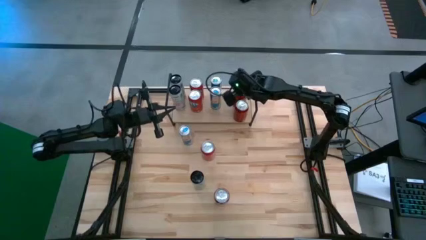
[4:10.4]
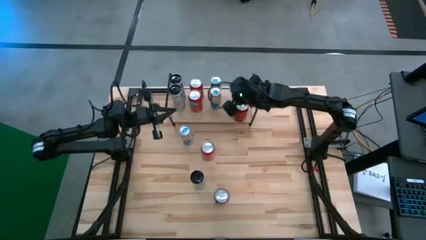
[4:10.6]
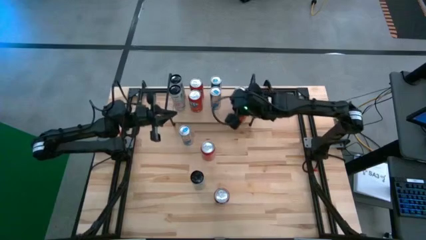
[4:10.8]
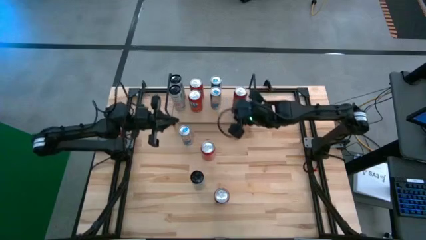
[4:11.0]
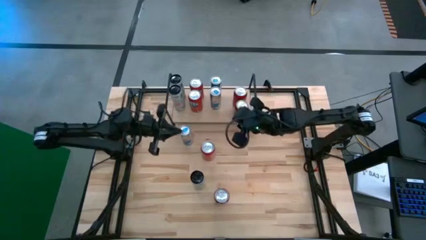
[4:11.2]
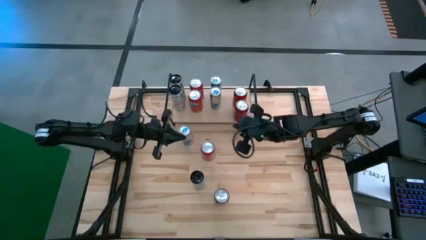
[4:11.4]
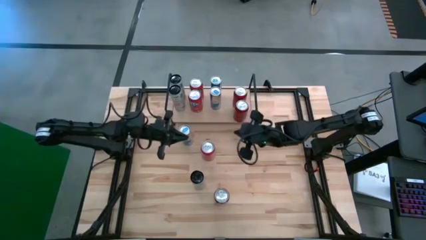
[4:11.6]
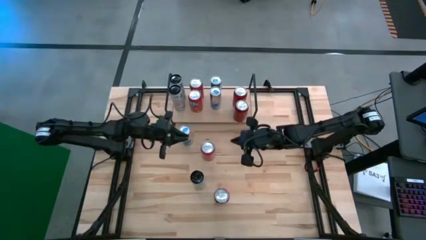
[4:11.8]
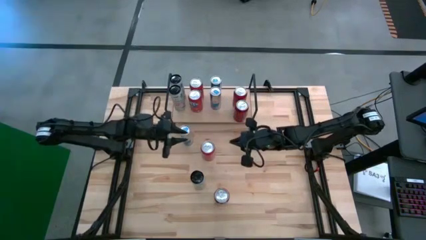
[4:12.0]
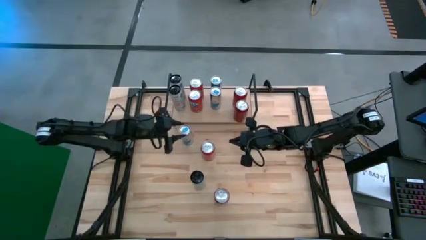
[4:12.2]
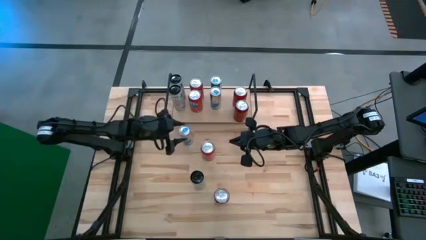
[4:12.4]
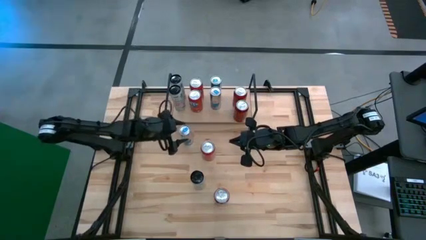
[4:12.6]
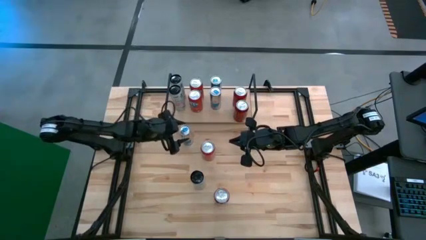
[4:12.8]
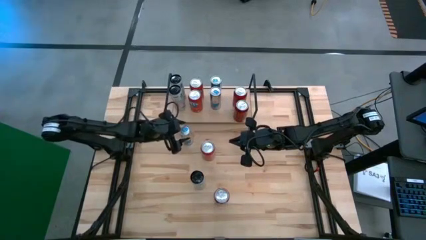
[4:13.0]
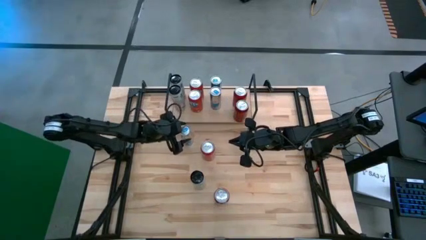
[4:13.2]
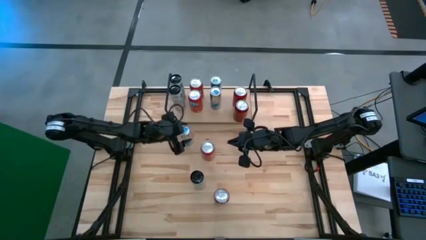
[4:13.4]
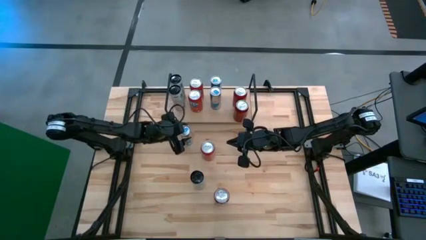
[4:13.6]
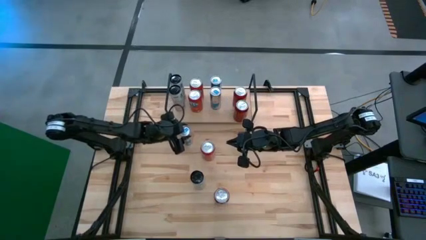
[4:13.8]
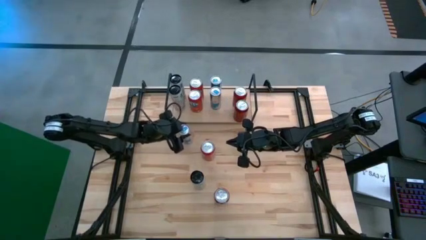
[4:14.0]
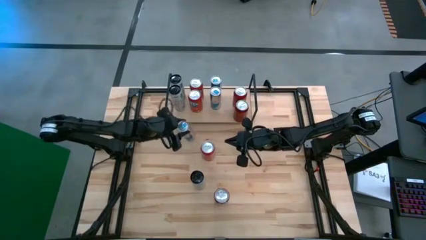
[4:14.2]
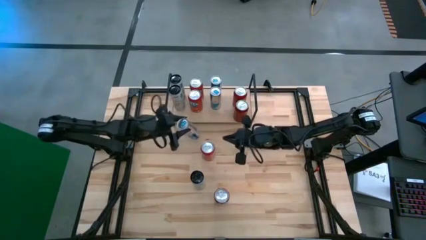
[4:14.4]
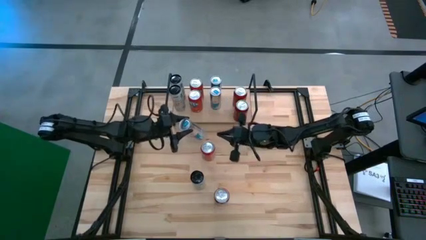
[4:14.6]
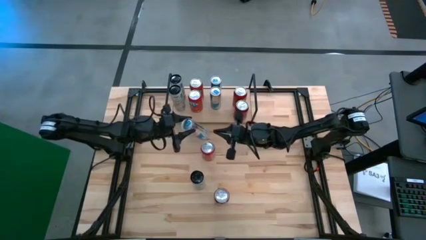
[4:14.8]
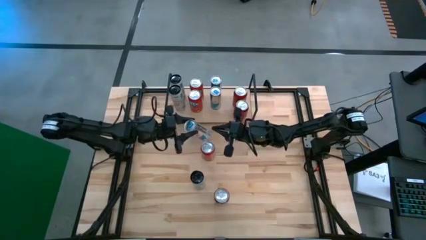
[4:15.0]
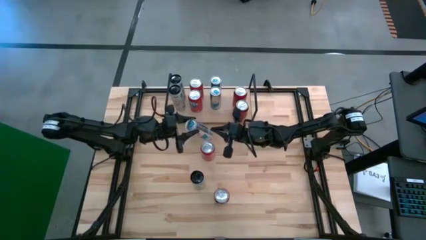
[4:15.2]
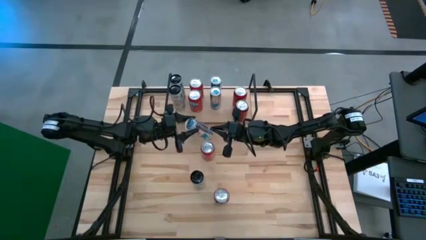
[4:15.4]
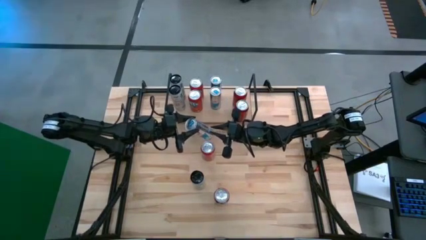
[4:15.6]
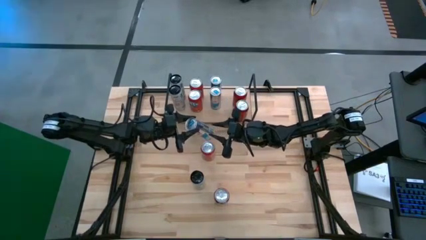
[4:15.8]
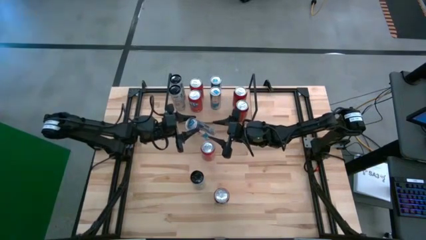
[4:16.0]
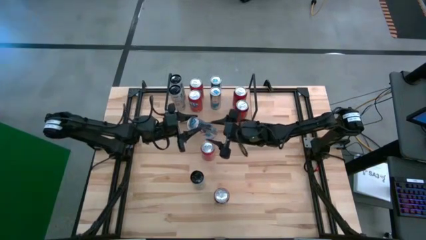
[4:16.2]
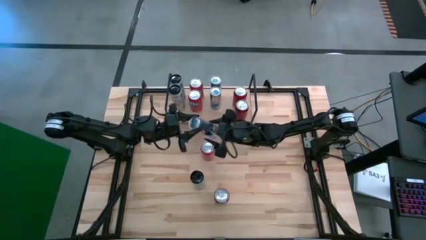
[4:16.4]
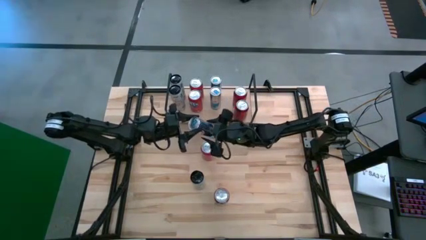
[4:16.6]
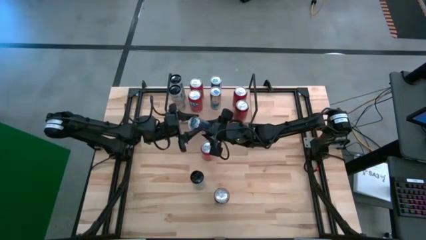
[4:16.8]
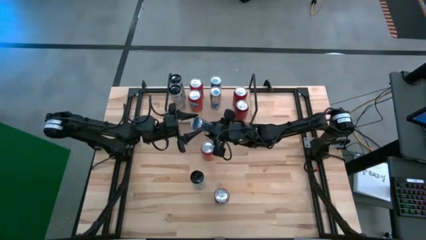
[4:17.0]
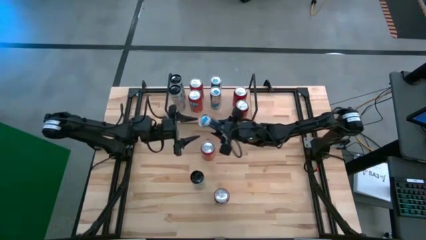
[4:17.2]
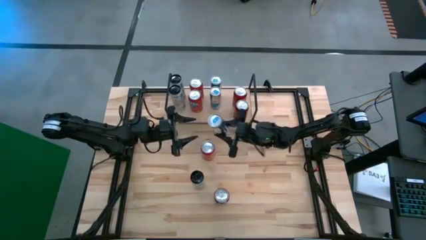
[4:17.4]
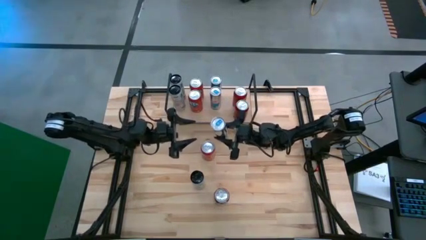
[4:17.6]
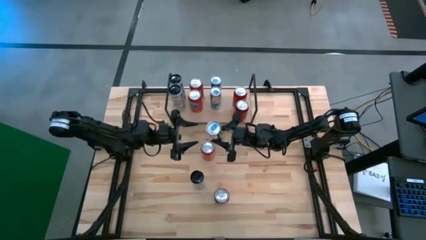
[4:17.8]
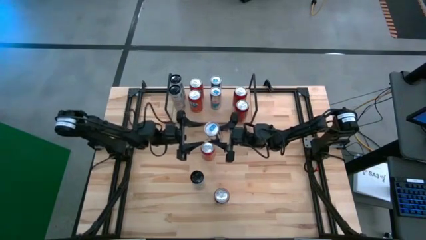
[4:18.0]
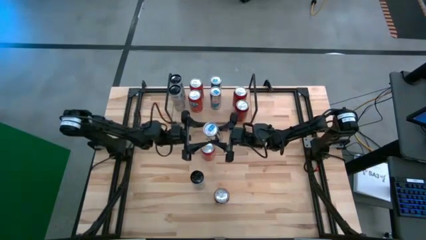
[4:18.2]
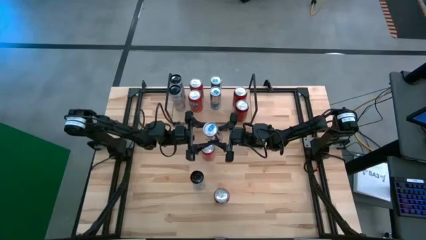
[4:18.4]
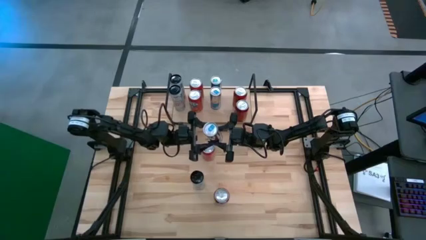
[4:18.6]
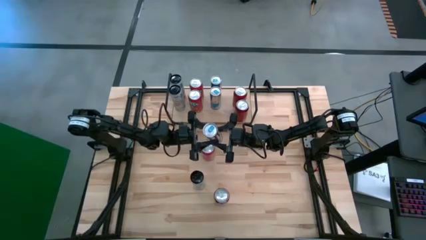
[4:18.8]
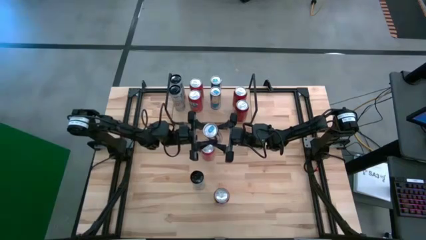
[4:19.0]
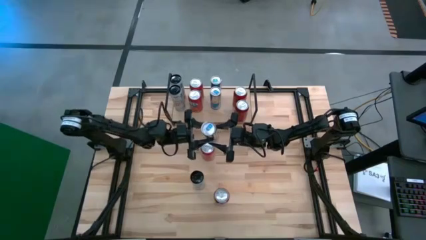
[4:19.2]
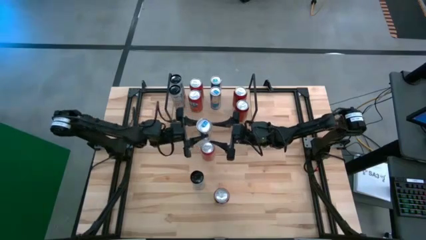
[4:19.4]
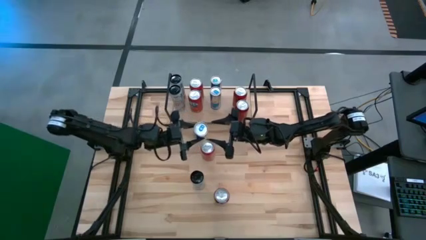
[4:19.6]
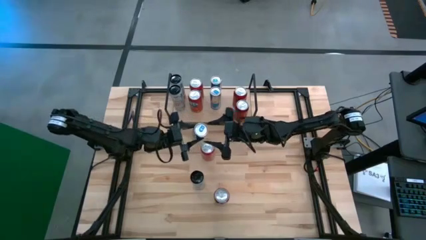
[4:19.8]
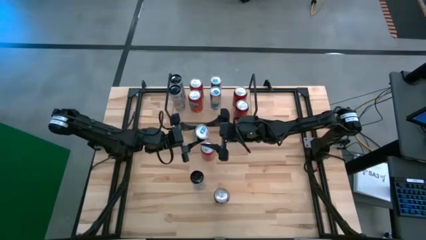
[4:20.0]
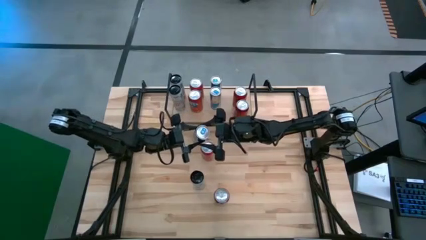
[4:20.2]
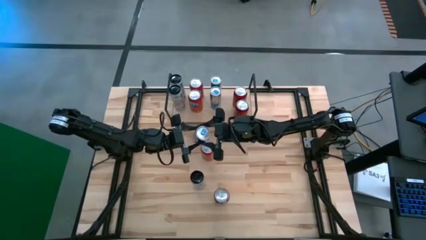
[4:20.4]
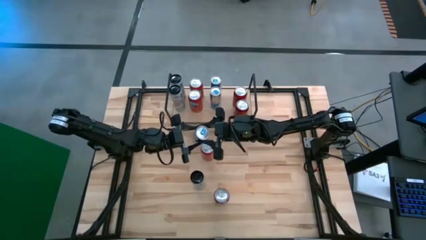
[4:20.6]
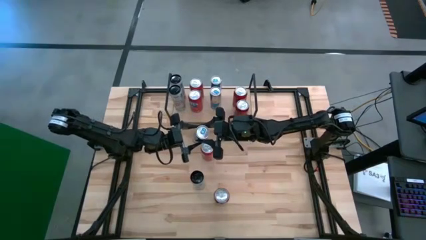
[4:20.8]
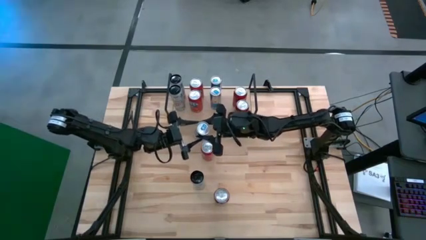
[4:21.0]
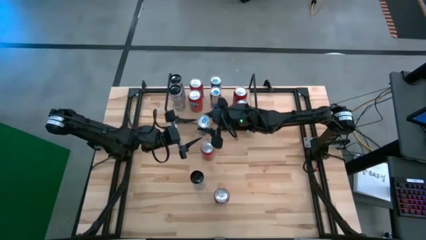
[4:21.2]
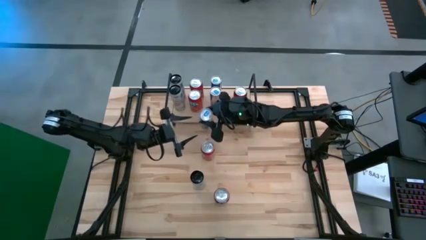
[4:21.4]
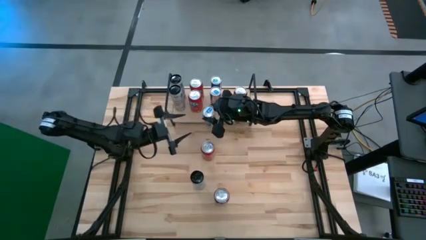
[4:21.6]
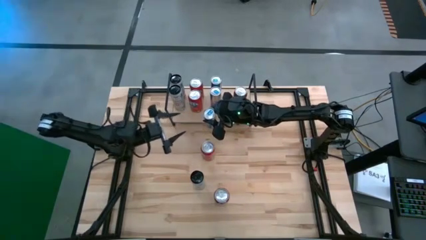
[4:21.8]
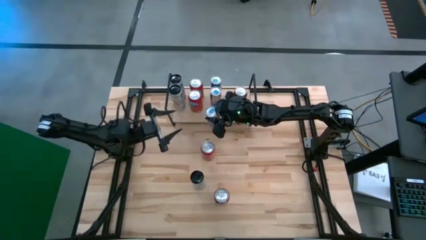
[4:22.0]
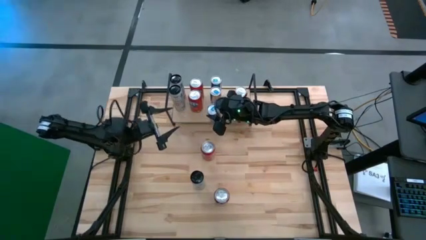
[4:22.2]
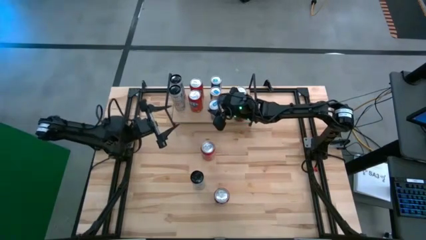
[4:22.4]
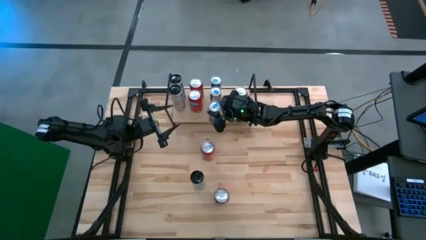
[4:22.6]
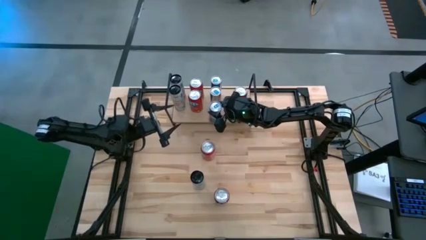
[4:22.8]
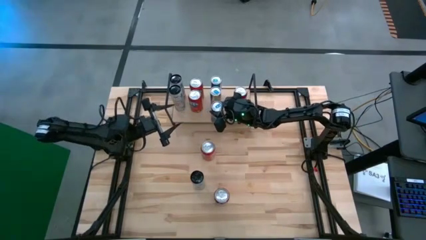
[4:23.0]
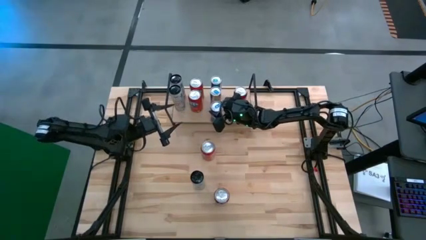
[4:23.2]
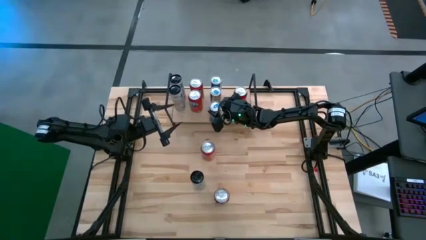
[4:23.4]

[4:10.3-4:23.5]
Task: Place canned beverage on shelf
Put the blue soda can on the shelf aligned with the other blue soda cans
